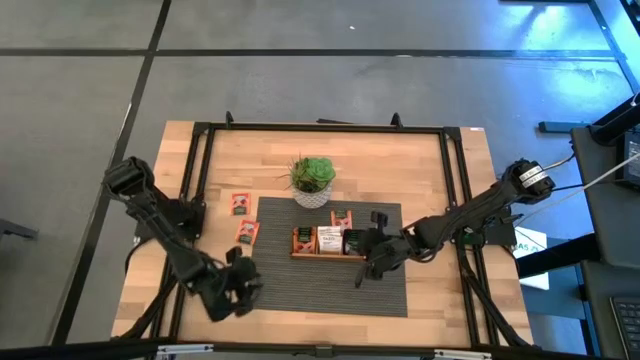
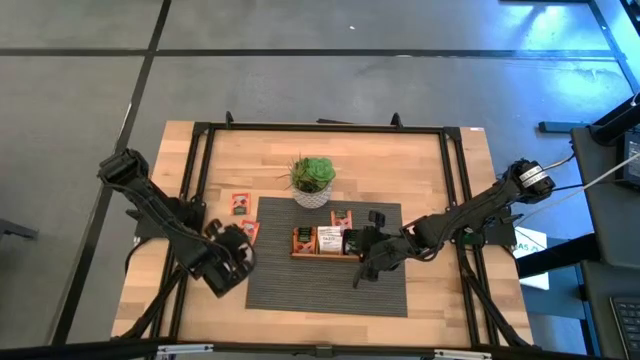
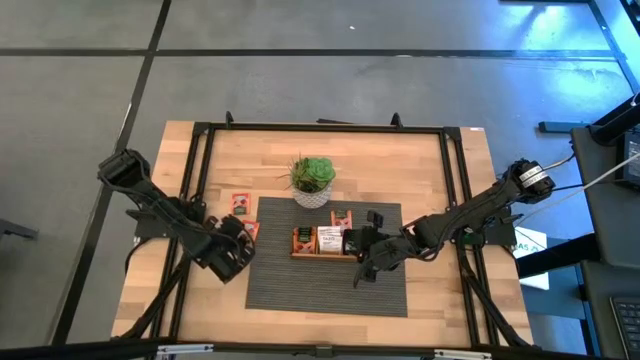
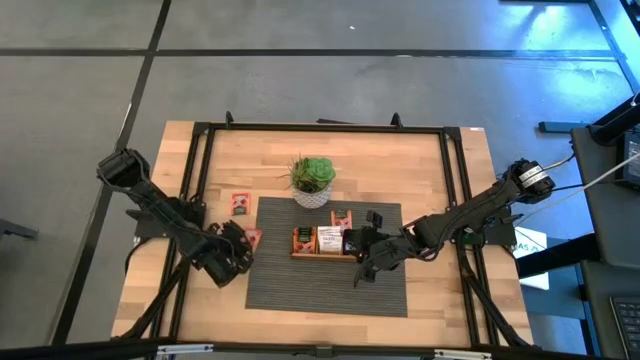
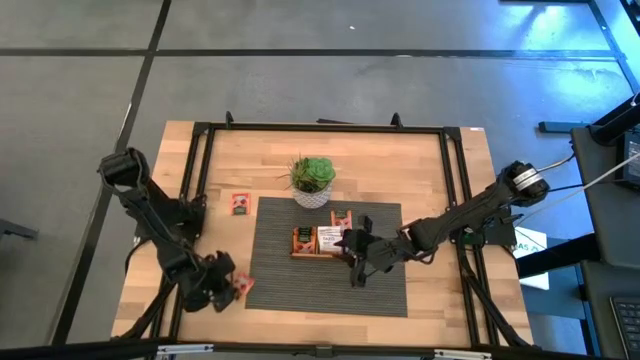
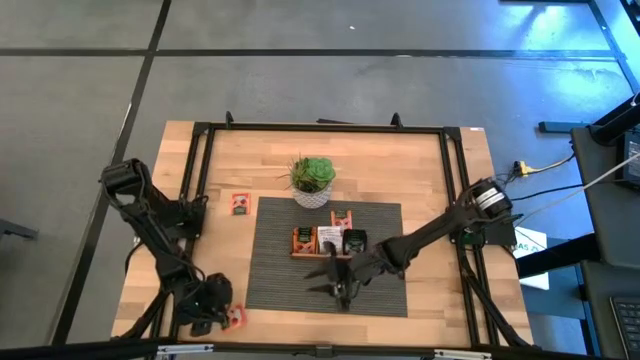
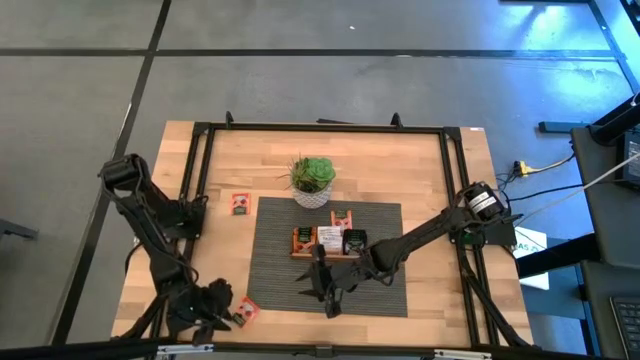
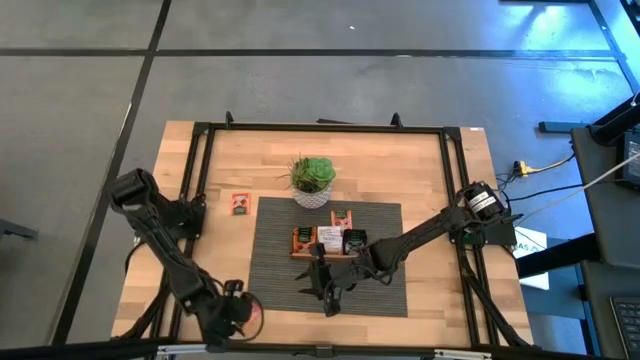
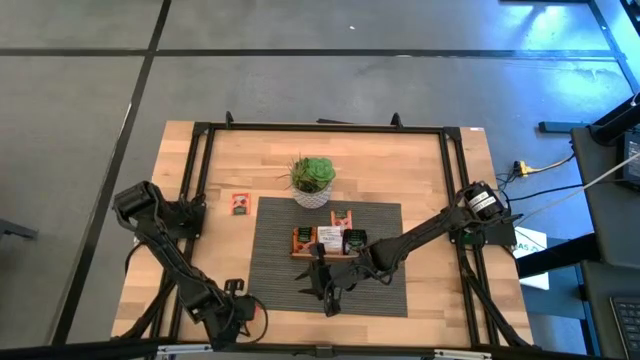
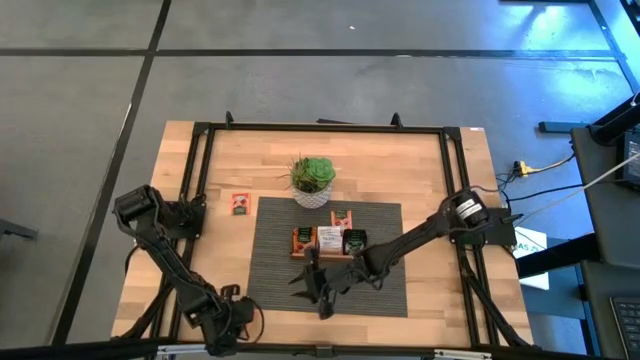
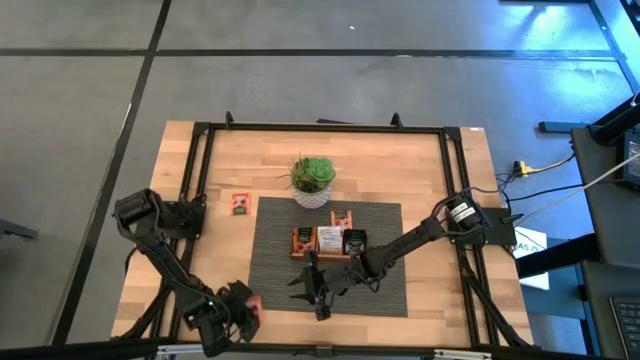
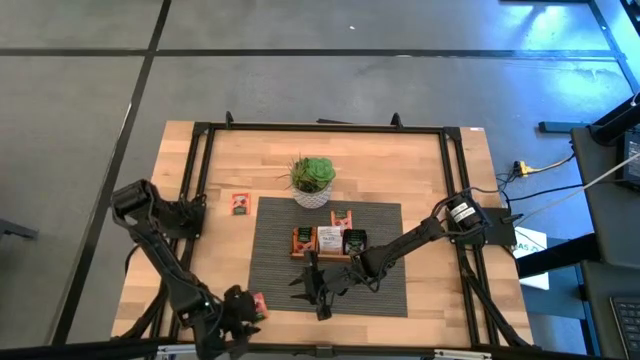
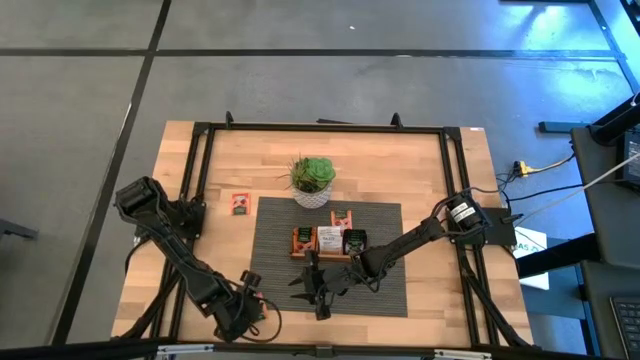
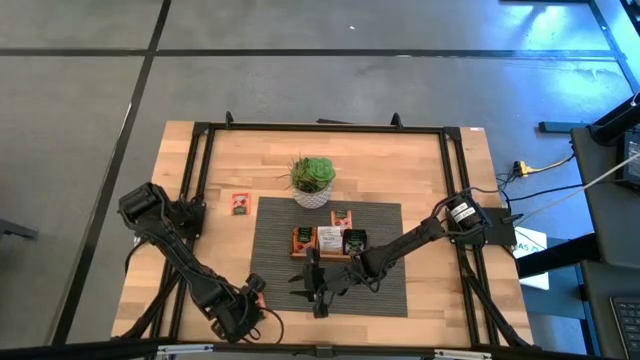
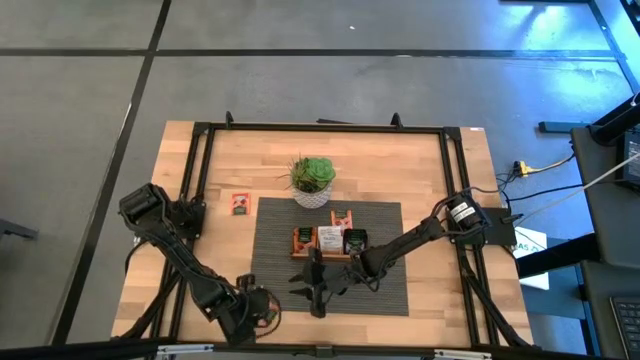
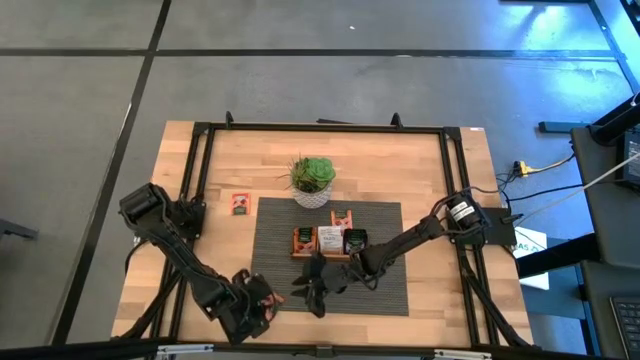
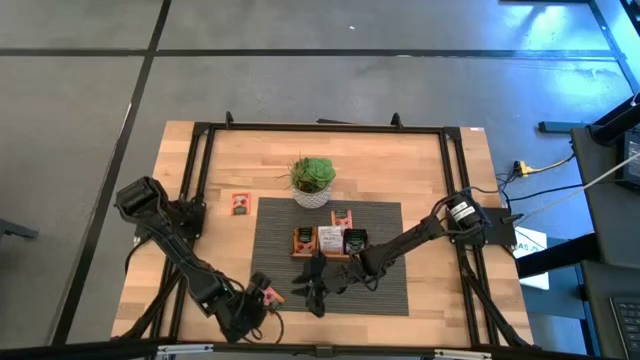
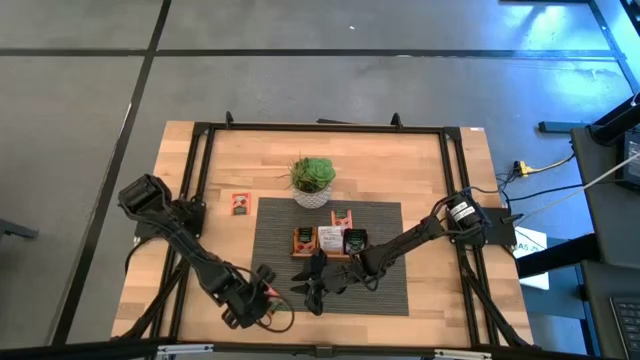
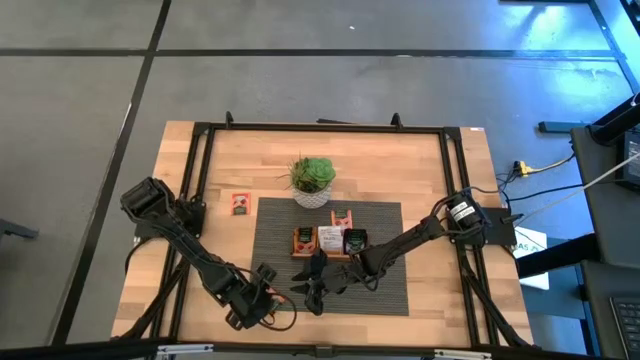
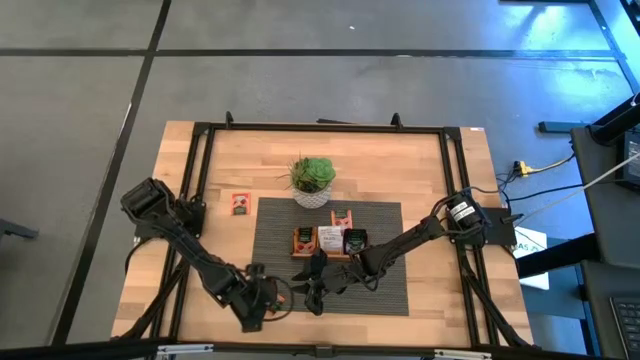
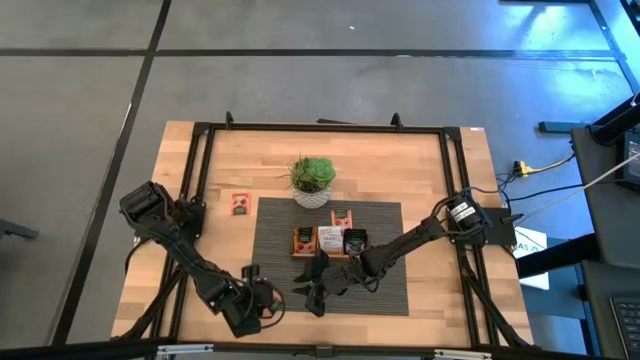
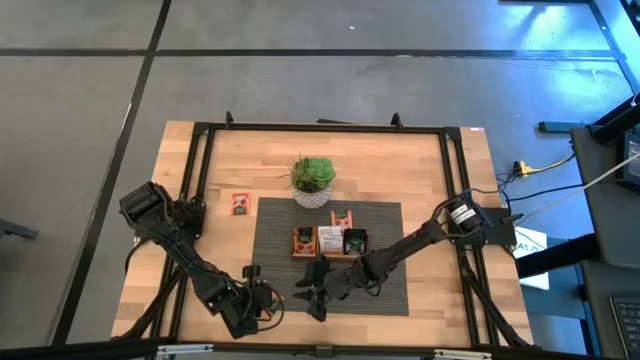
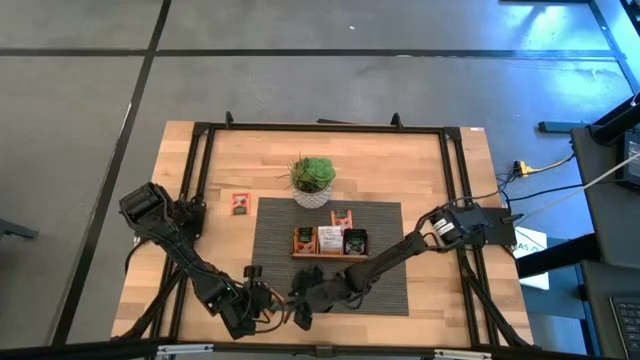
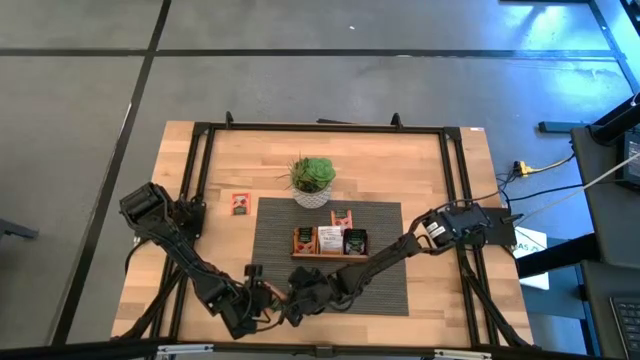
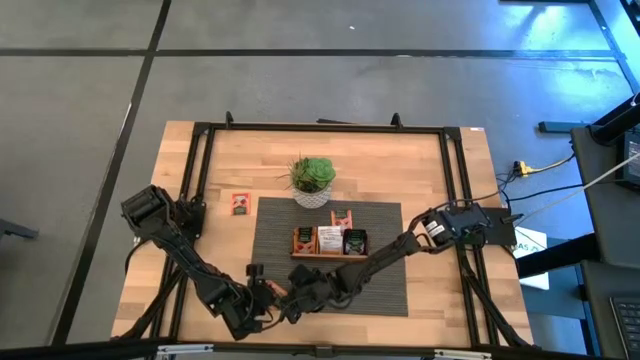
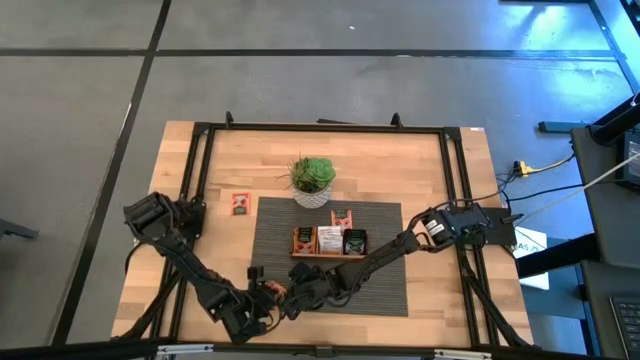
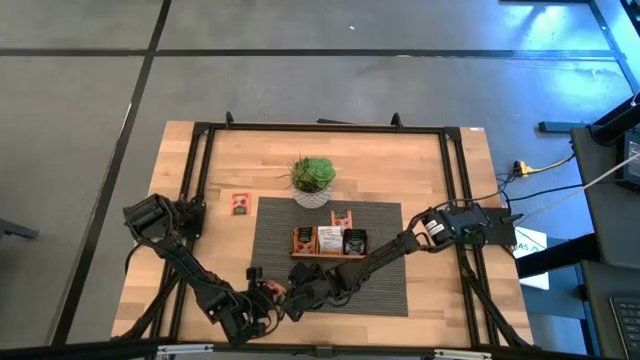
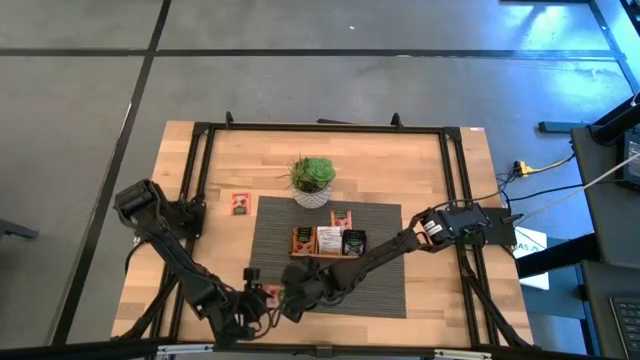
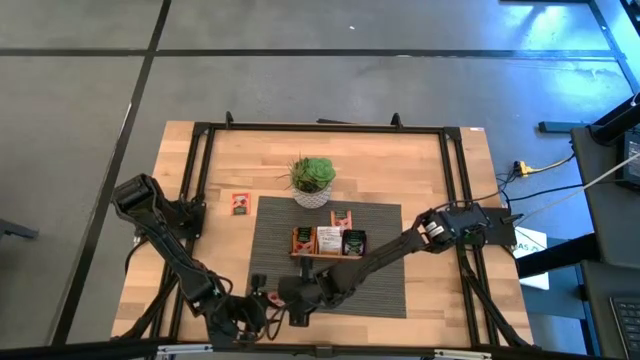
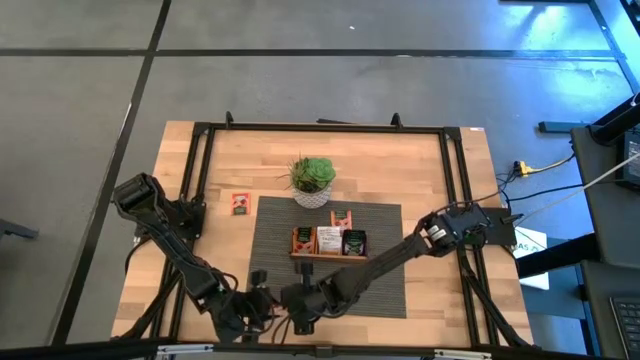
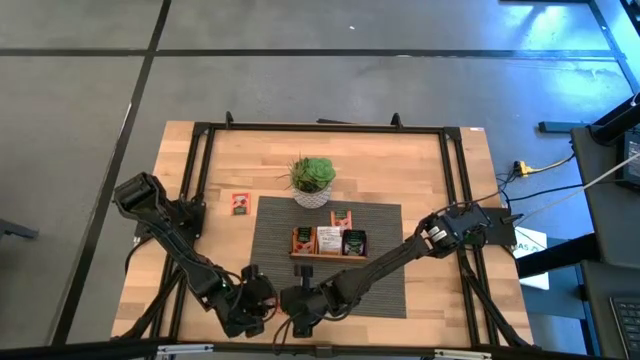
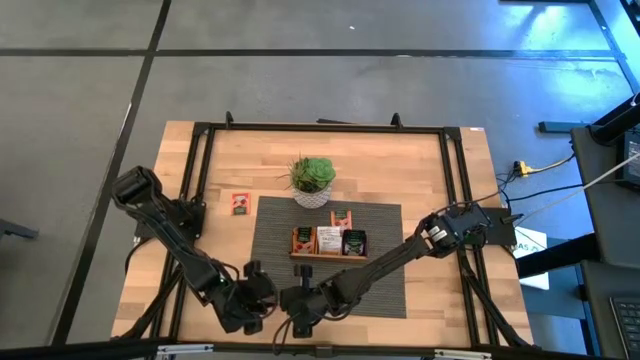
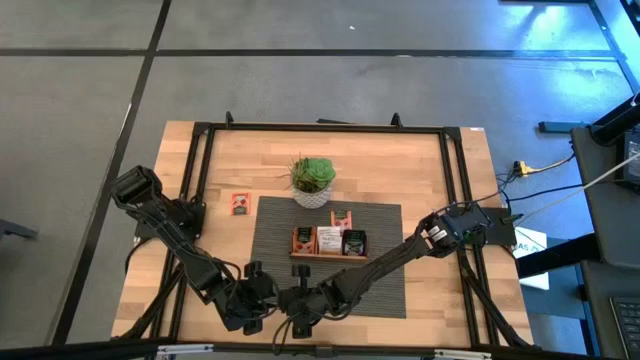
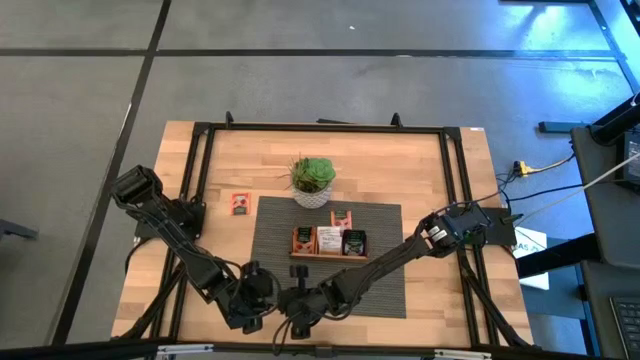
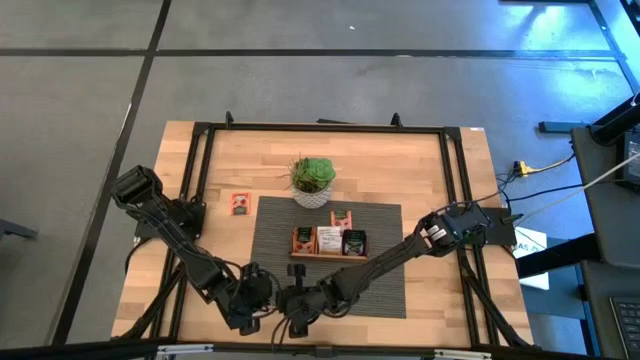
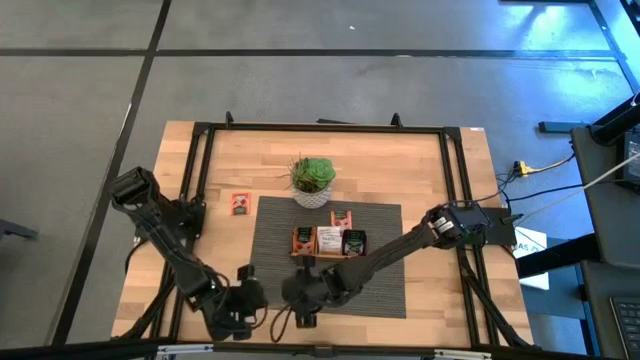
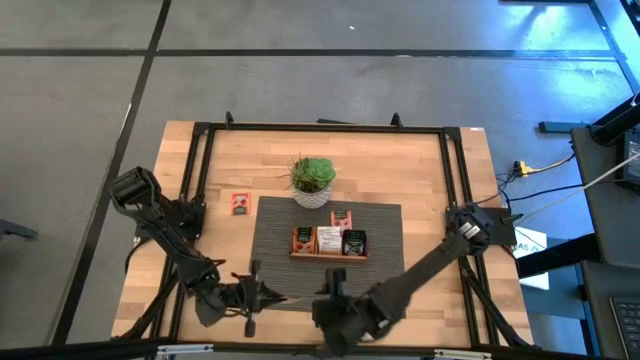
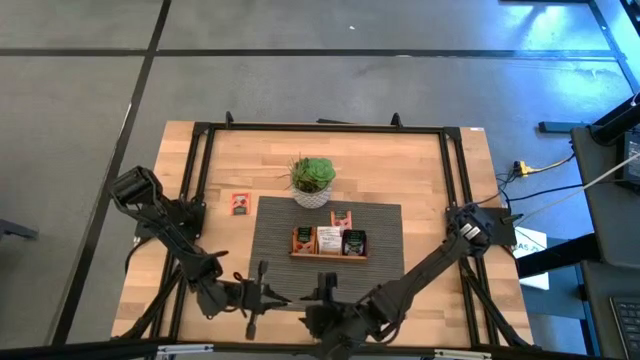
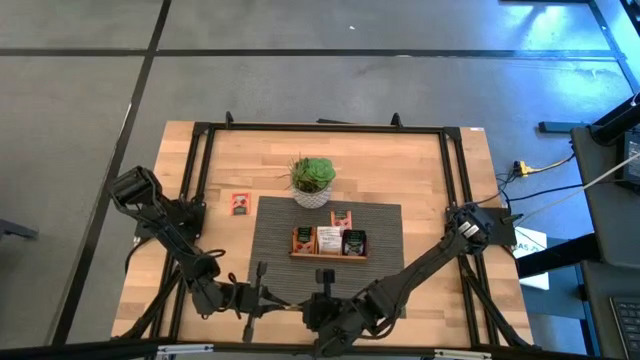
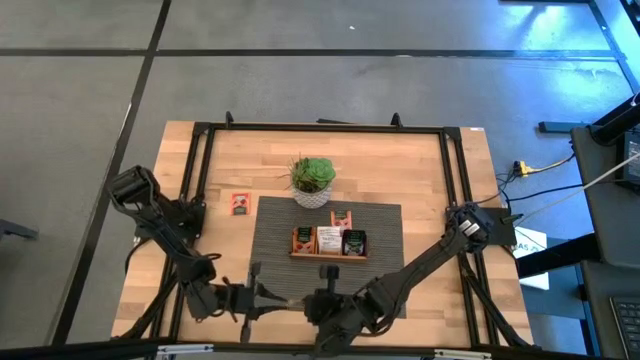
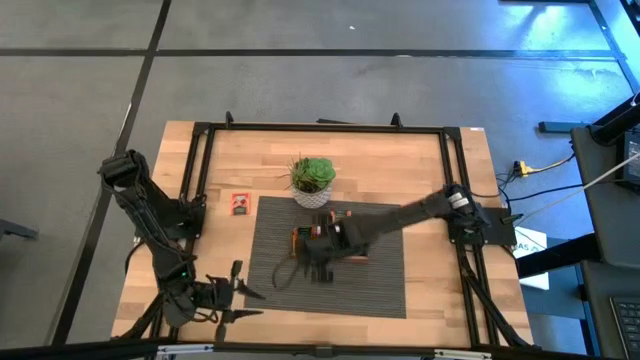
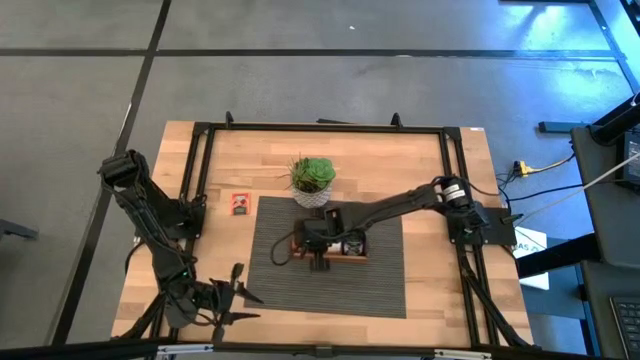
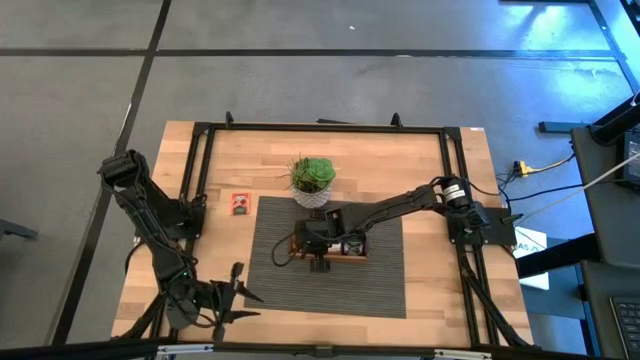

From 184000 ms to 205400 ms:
Task: Pick & Place Tea
Put the orange tea bag into the left section of the wooden organizer
